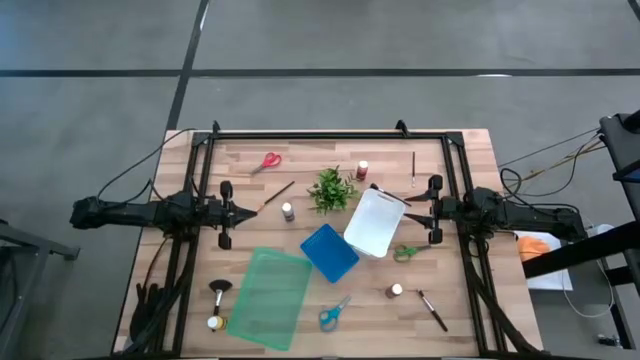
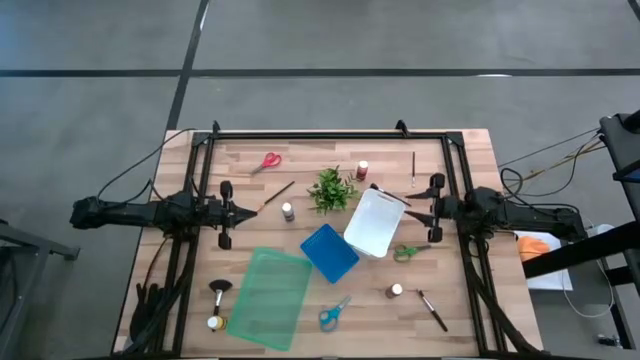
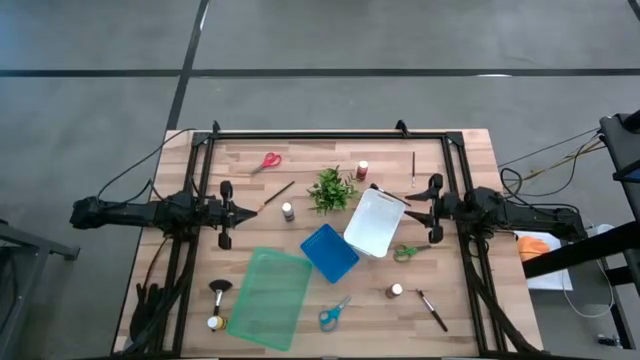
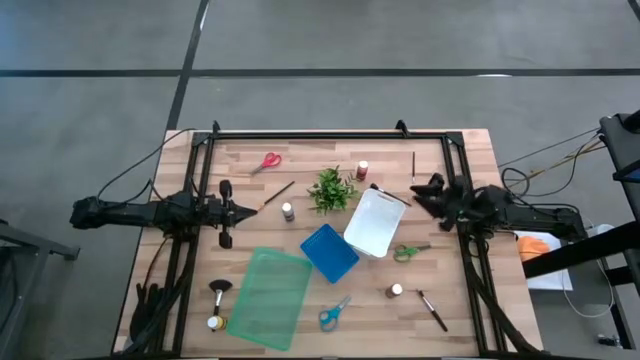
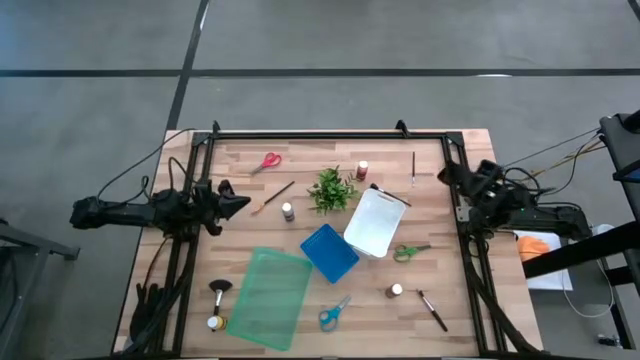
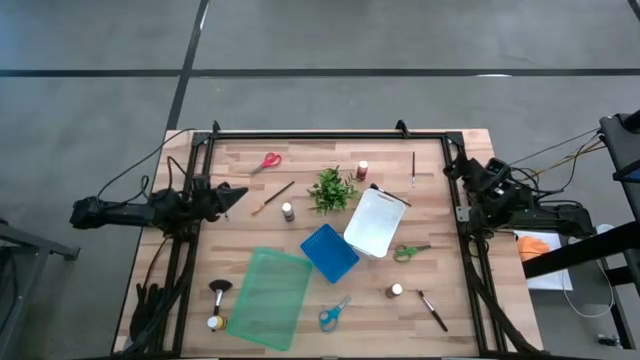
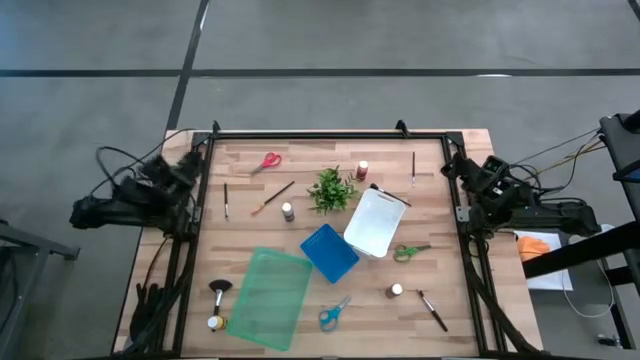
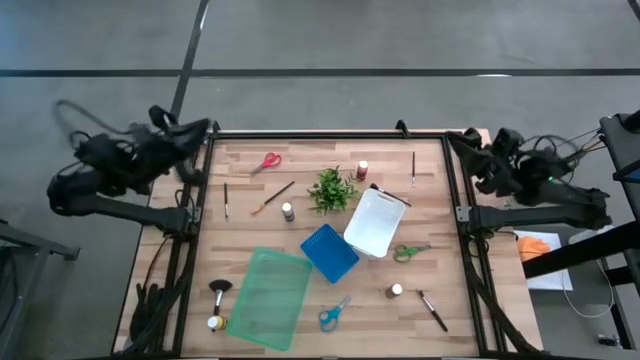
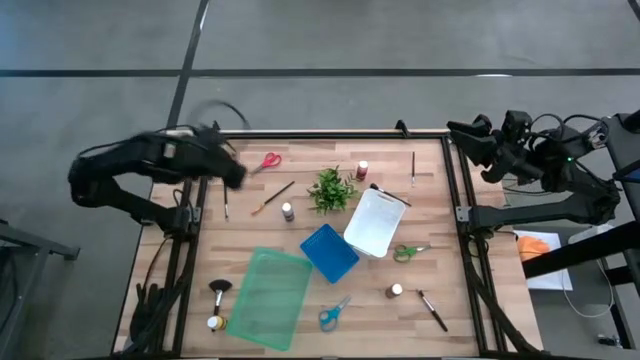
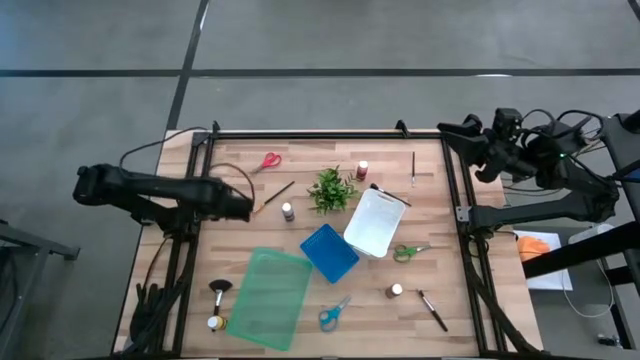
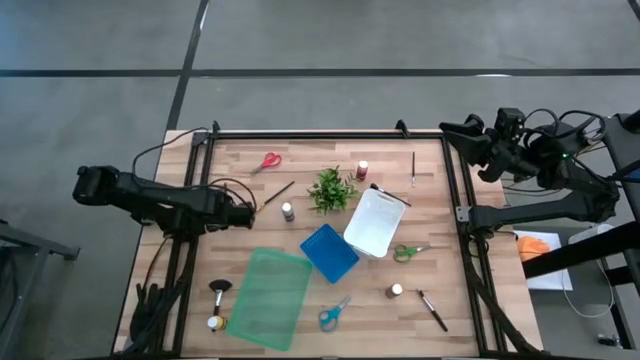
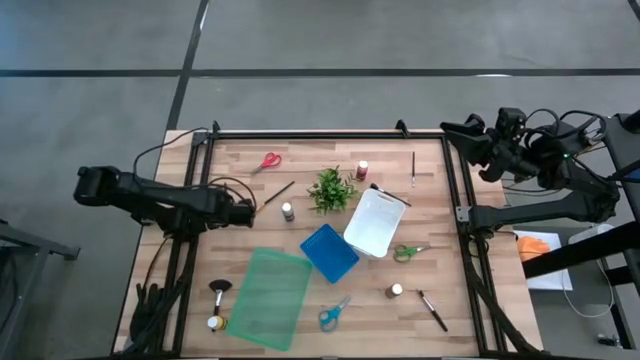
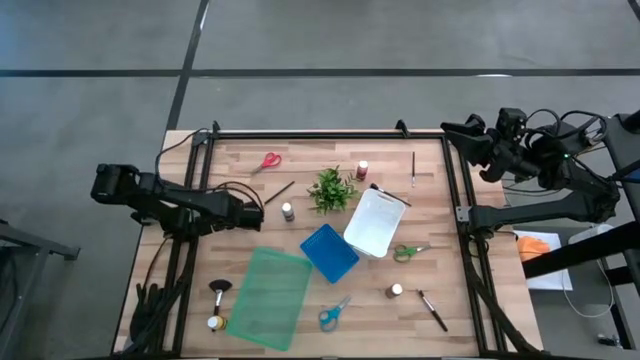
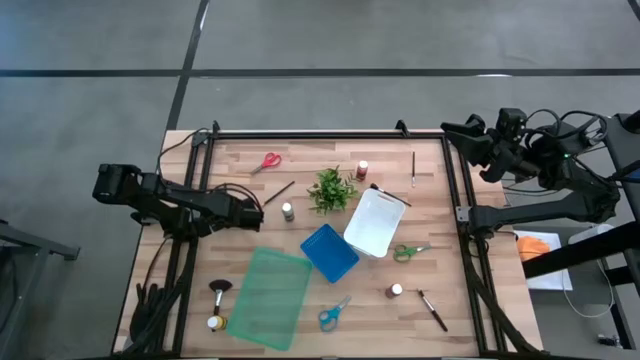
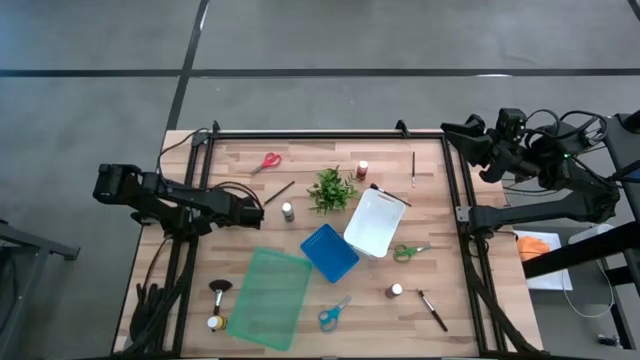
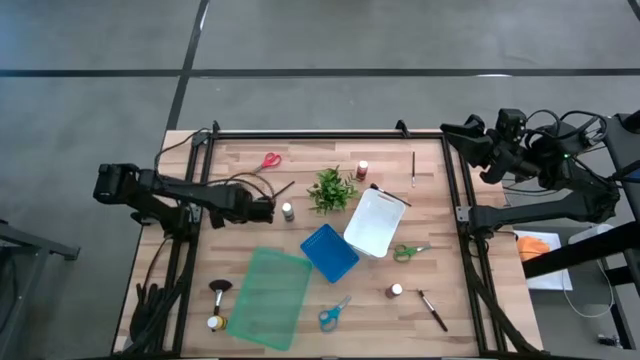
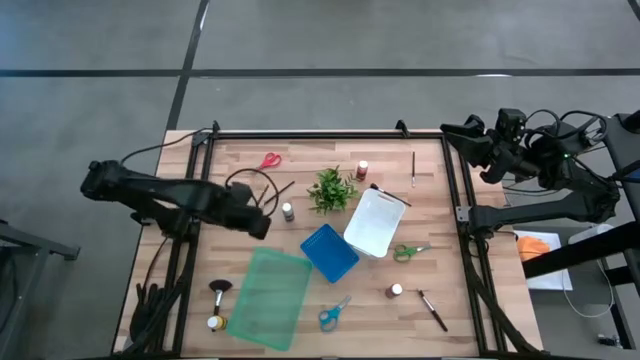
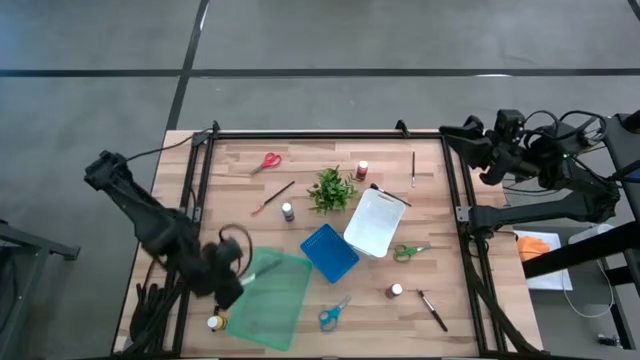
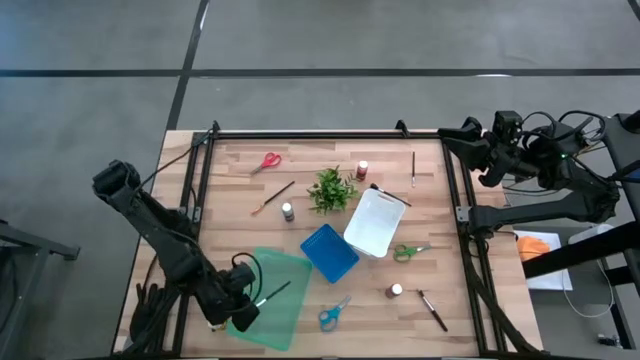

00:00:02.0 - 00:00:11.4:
Task: Pick & Place Paint Supplies
Put the silver and black paintbrush into the green bin

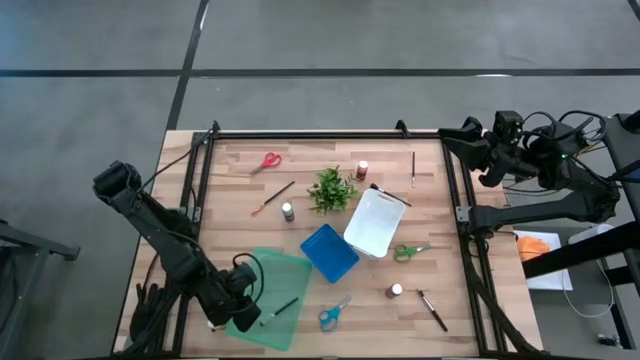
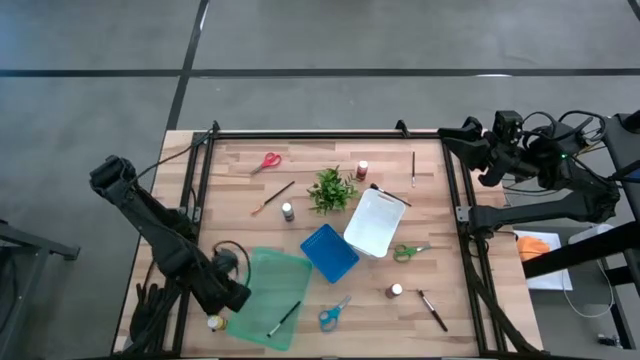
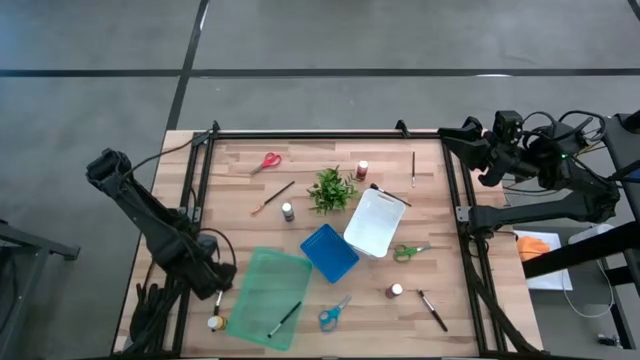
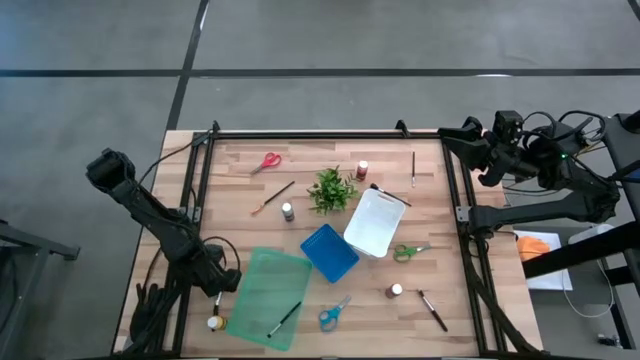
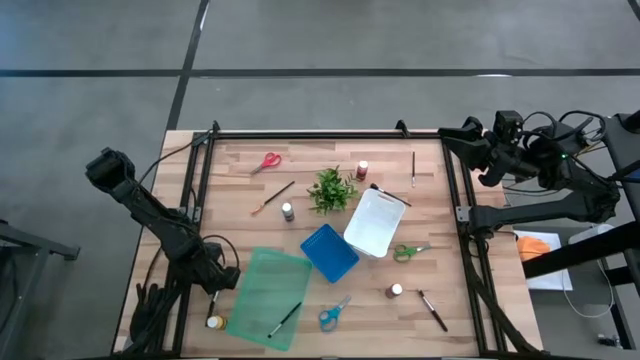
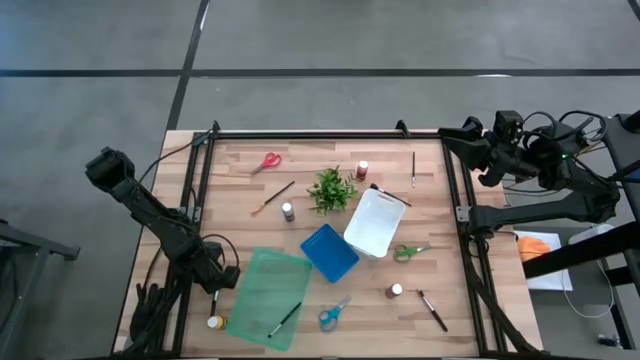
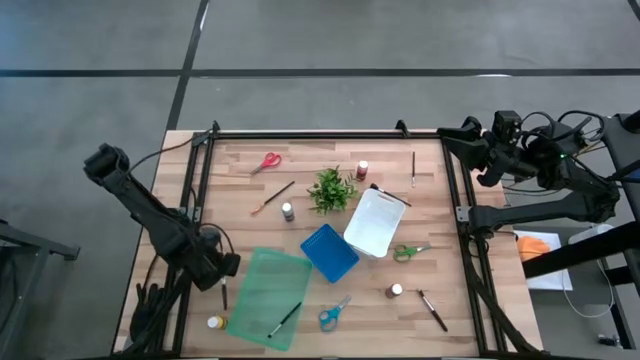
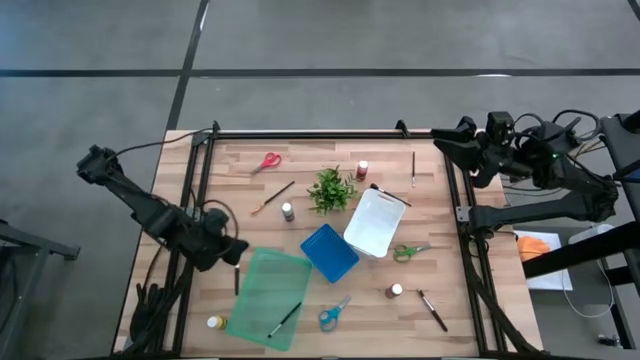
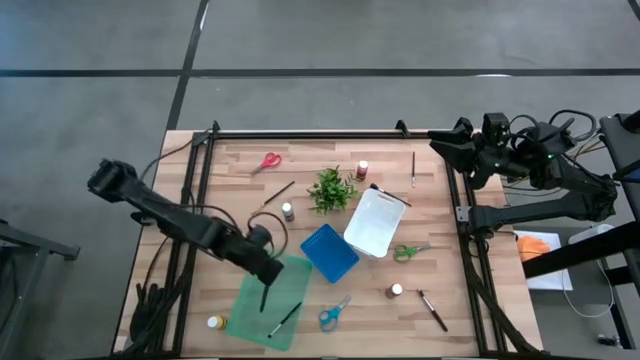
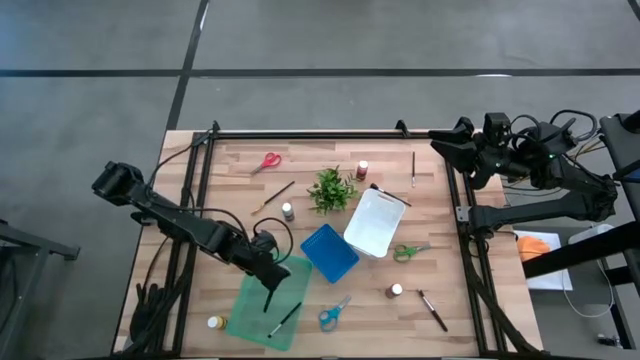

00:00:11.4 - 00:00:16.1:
Put the black highlighter brush into the green bin

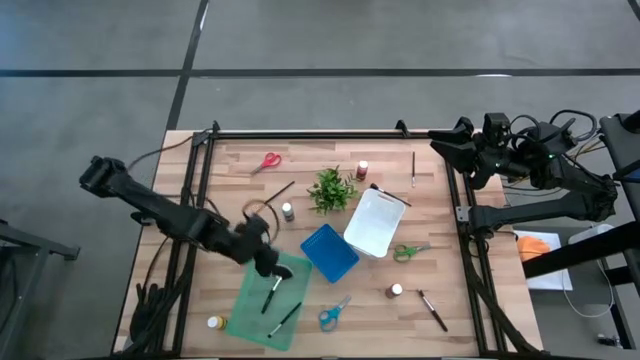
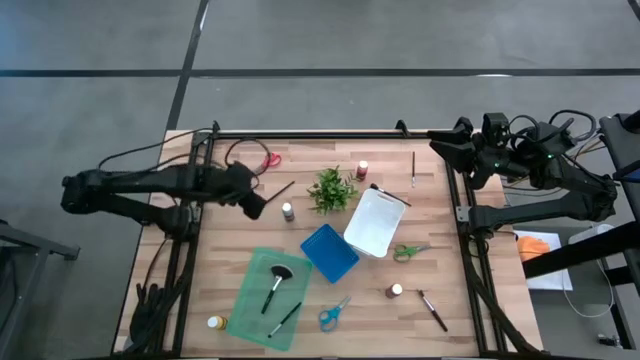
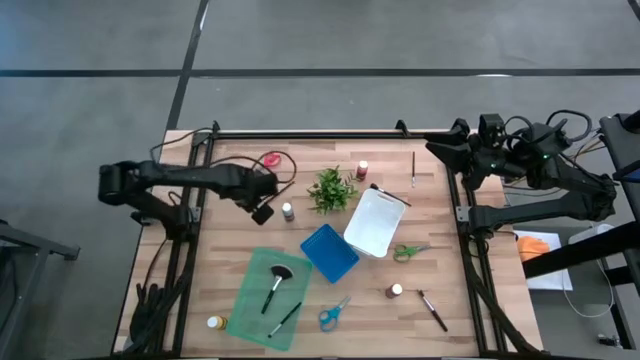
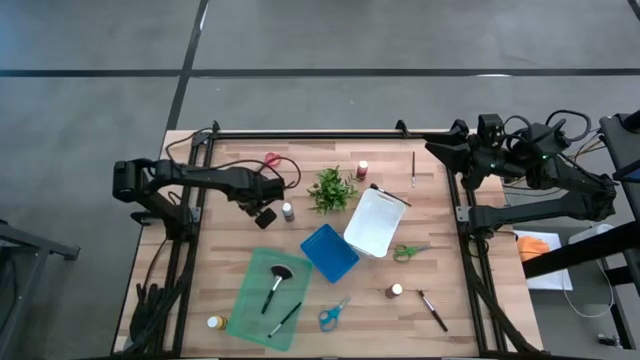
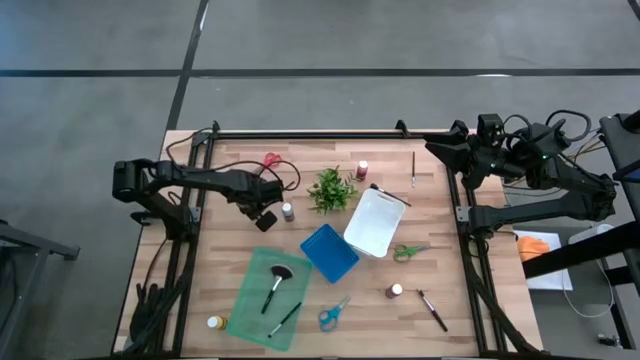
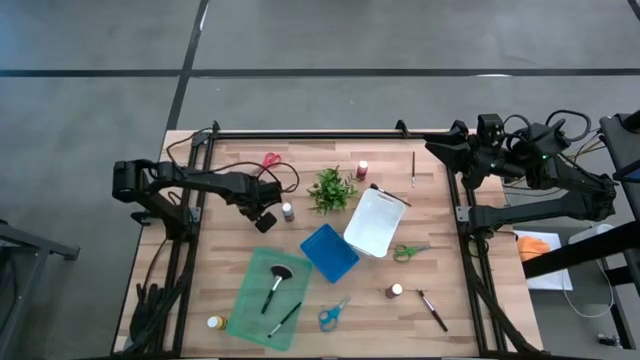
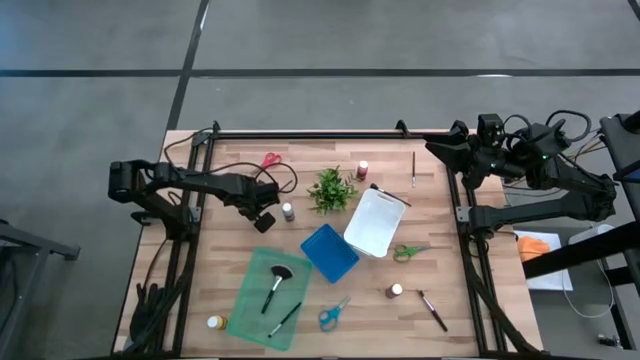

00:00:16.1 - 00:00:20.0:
Put the gold and black paintbrush into the green bin

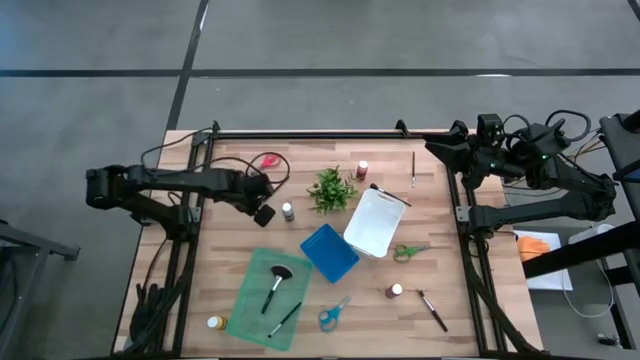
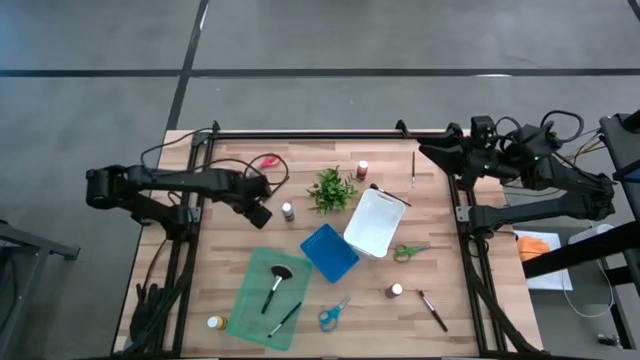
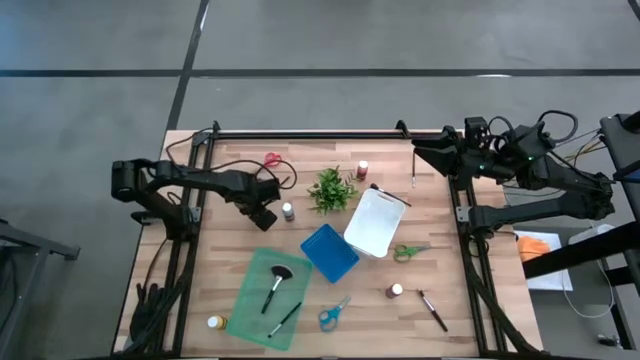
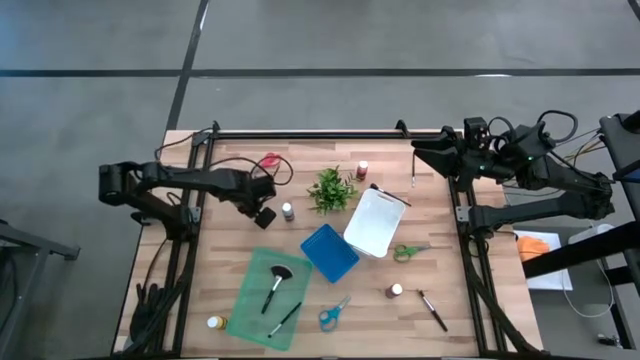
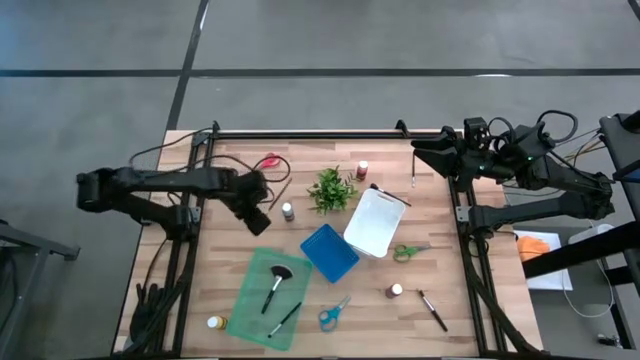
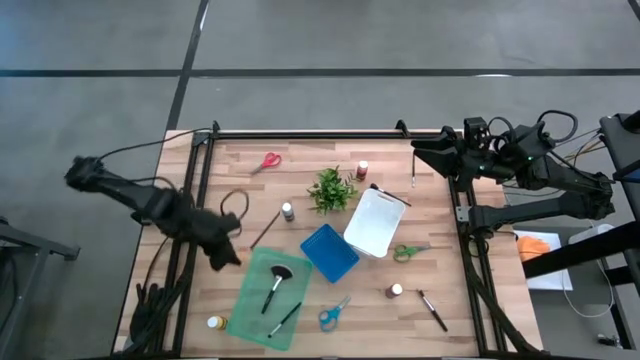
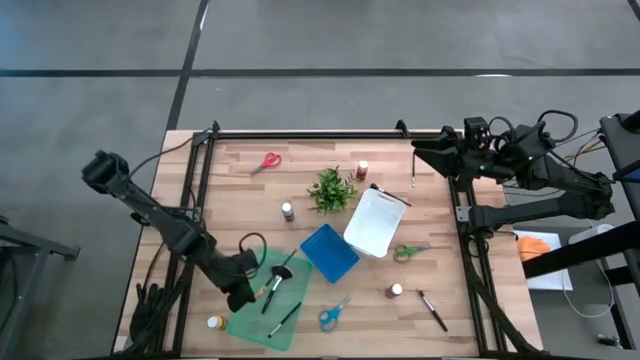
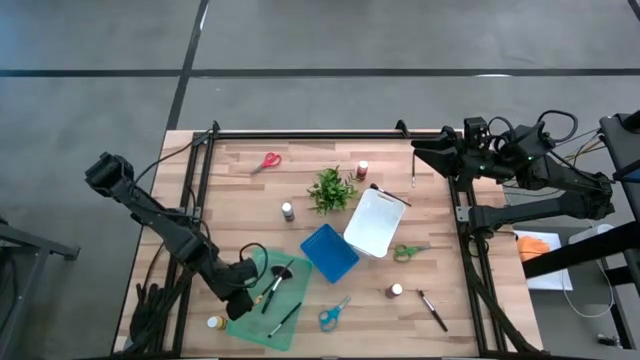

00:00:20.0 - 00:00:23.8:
Put the gold and black paintbrush into the green bin
